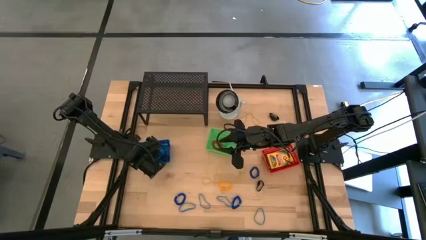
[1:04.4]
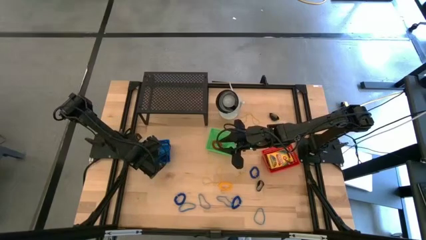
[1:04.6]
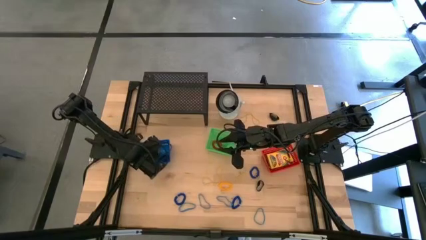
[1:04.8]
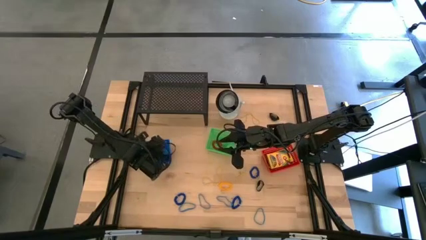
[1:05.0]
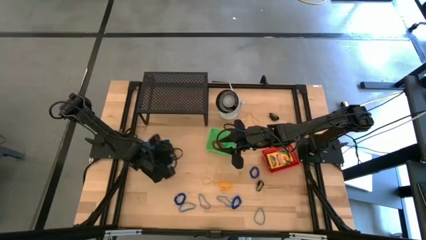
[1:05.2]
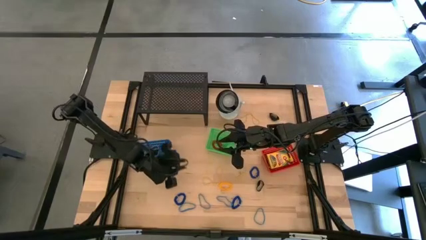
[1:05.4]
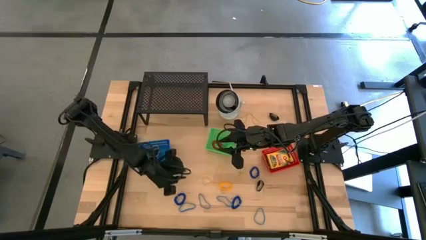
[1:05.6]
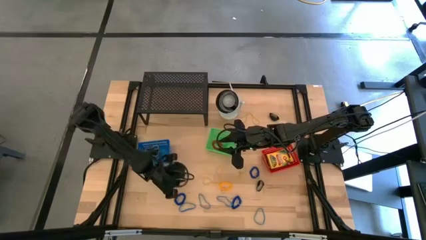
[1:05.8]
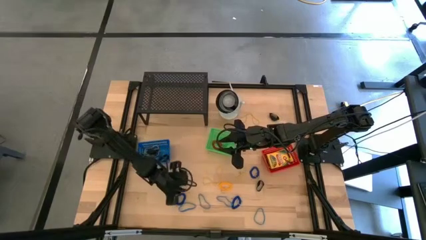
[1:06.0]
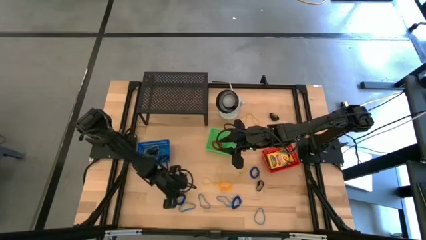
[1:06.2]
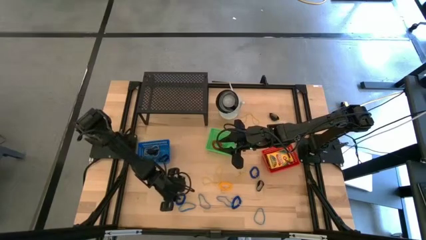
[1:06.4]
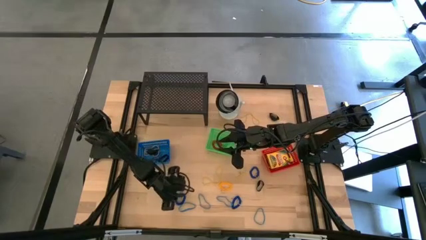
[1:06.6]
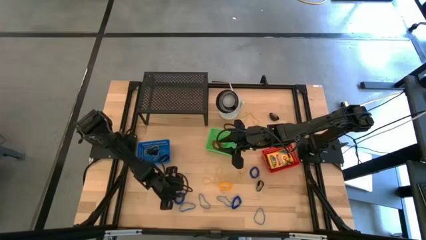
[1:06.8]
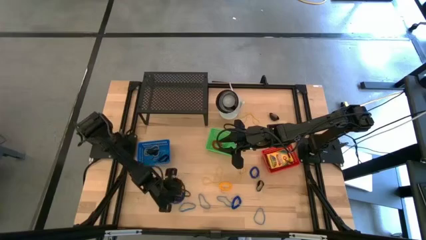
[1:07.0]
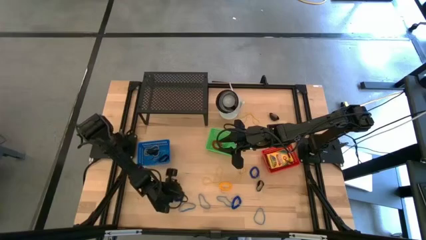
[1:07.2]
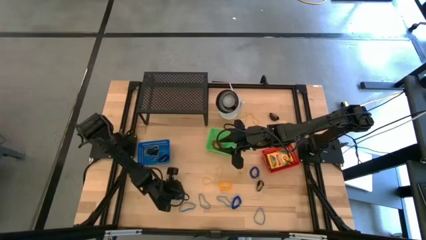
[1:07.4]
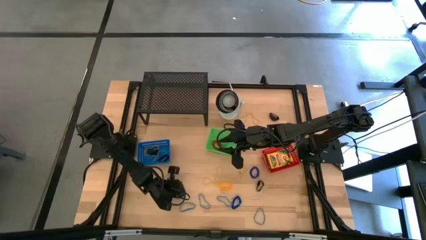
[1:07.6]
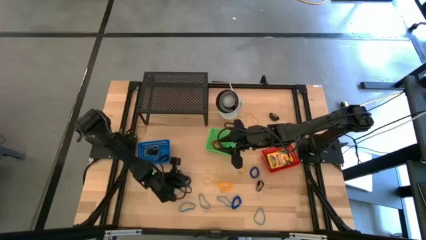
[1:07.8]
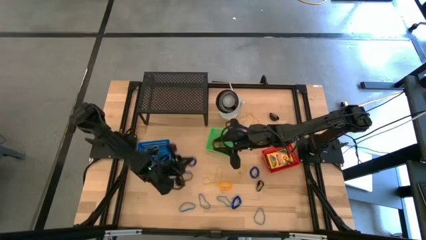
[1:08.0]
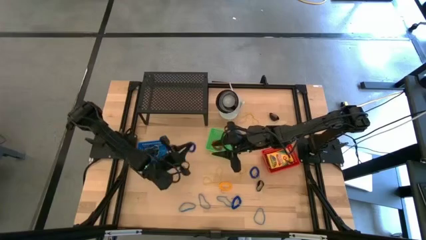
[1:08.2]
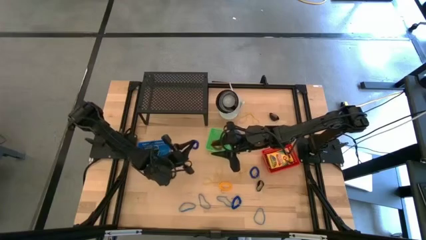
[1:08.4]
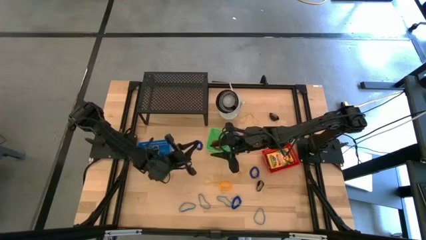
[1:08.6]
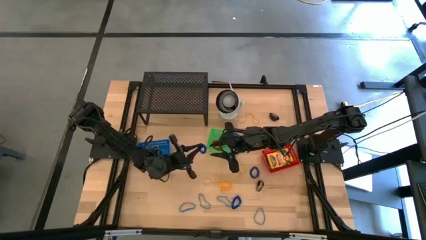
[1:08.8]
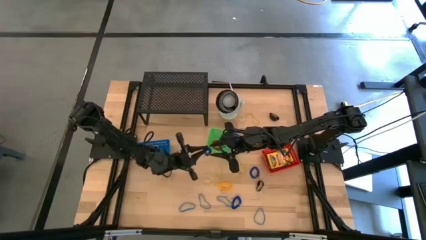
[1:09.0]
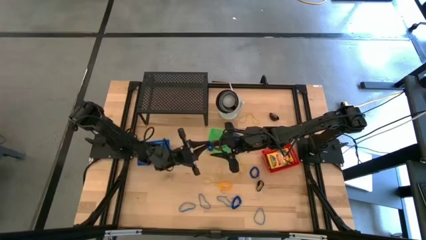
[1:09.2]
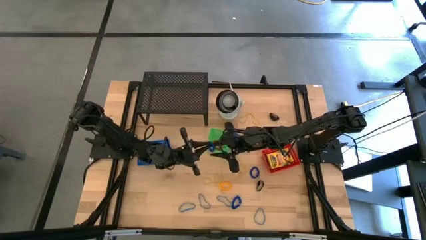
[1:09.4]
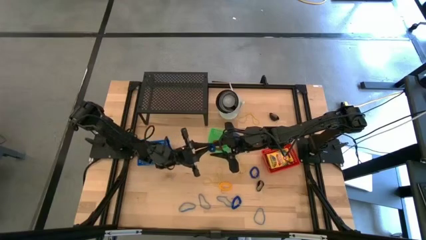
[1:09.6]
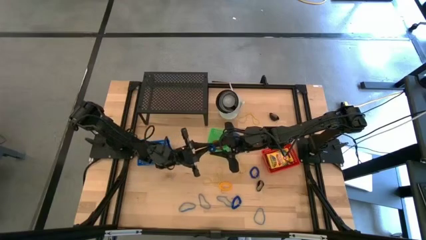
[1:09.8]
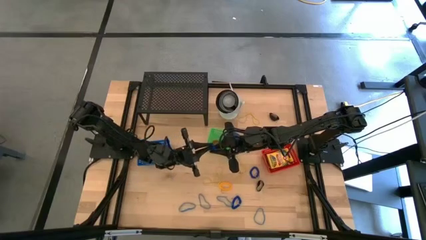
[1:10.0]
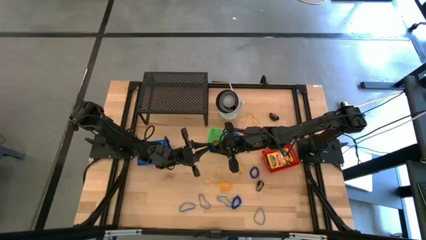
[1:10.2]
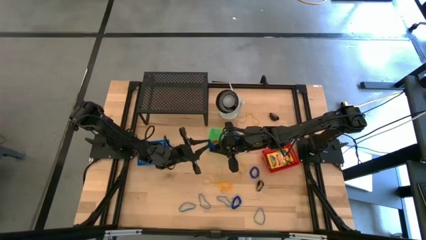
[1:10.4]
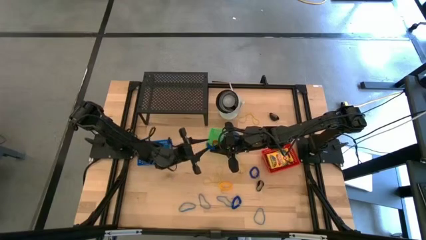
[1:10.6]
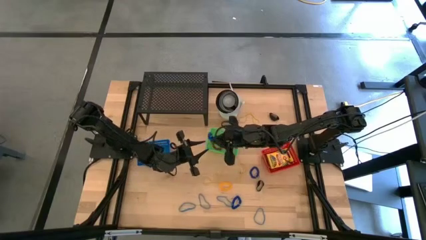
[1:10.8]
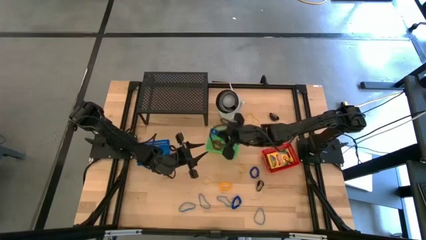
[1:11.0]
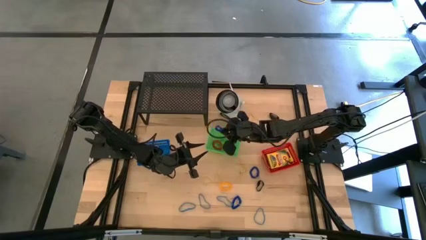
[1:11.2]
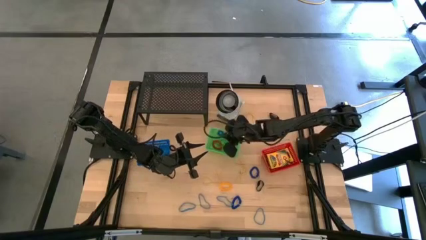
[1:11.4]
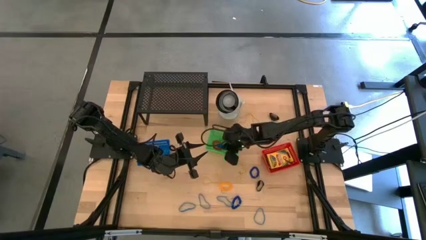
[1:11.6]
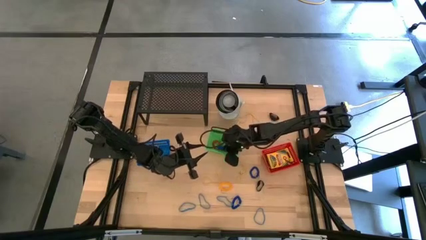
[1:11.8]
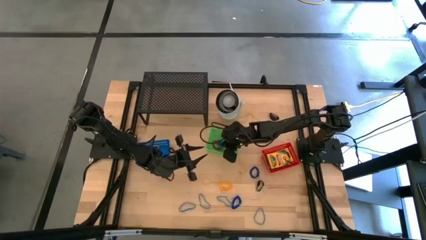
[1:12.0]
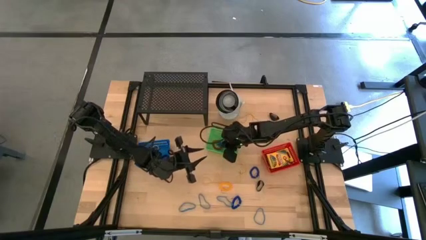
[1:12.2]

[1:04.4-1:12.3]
Task: Pick & Place Office Desk Supplies
Put the blue spring keychain into the green bin

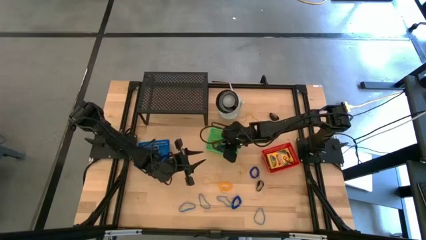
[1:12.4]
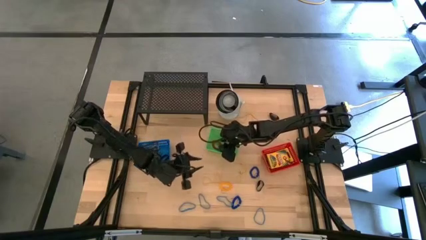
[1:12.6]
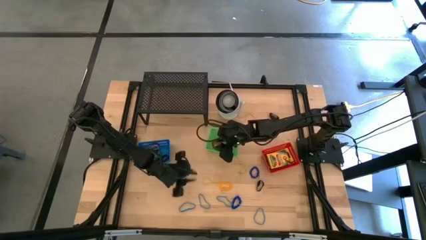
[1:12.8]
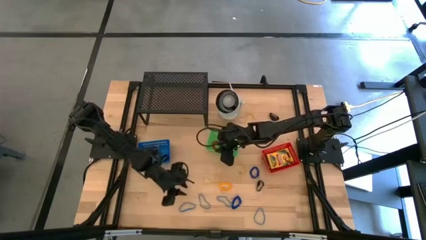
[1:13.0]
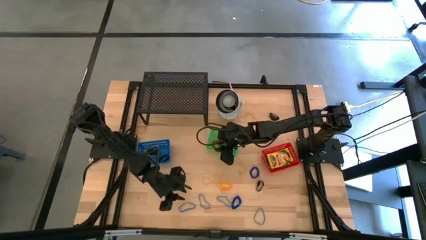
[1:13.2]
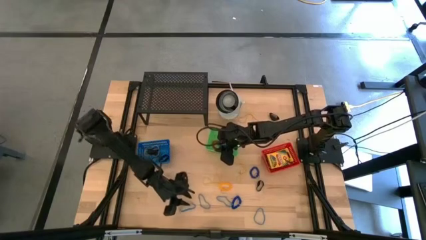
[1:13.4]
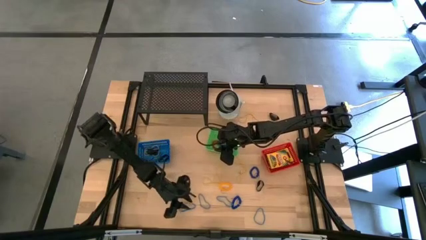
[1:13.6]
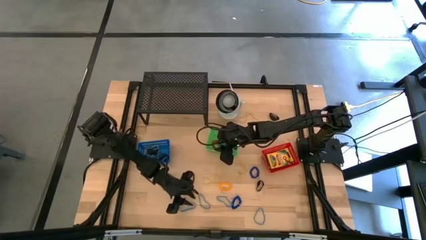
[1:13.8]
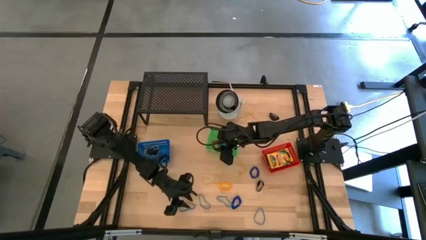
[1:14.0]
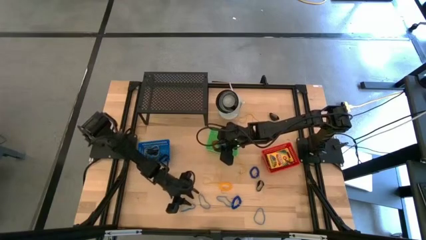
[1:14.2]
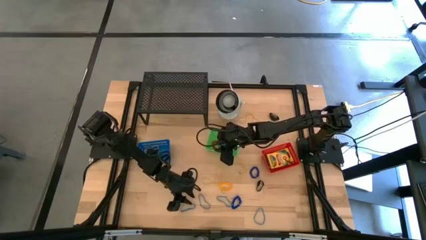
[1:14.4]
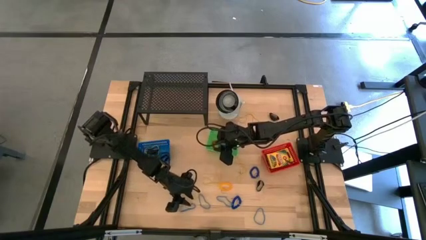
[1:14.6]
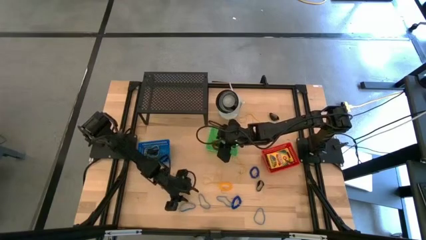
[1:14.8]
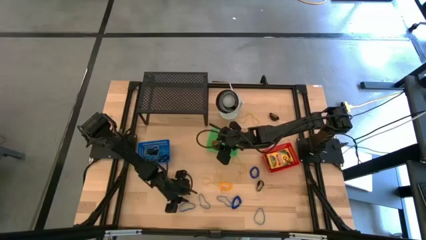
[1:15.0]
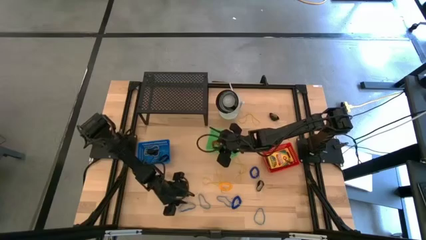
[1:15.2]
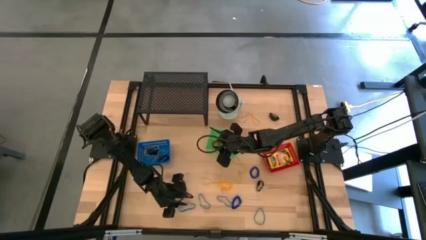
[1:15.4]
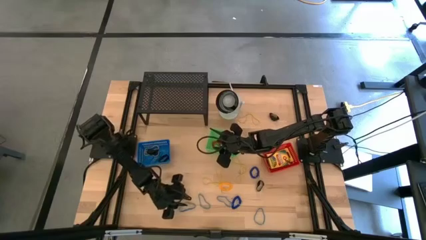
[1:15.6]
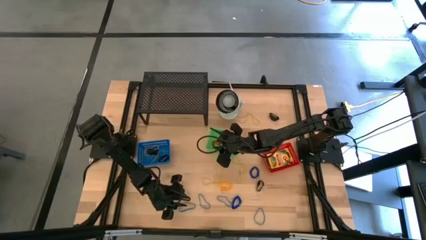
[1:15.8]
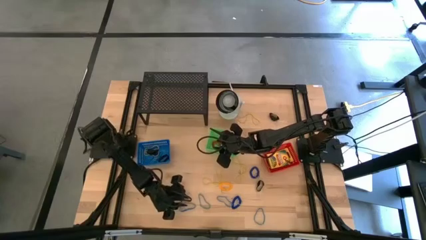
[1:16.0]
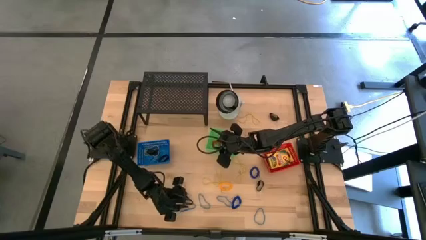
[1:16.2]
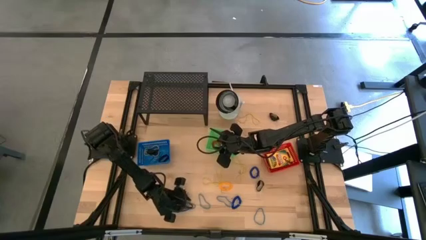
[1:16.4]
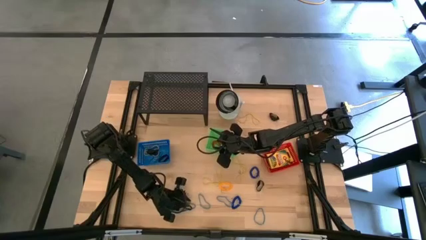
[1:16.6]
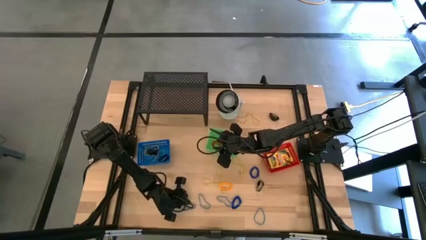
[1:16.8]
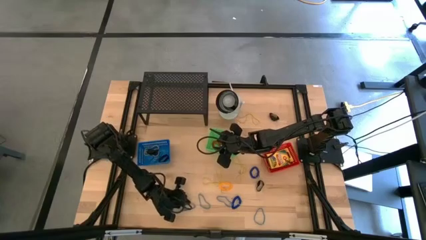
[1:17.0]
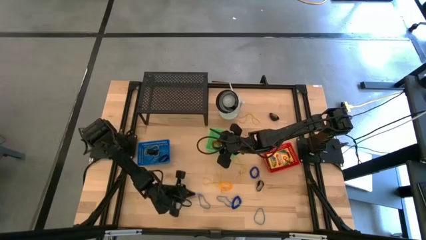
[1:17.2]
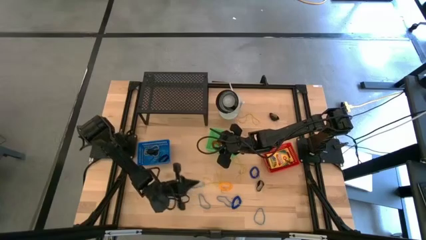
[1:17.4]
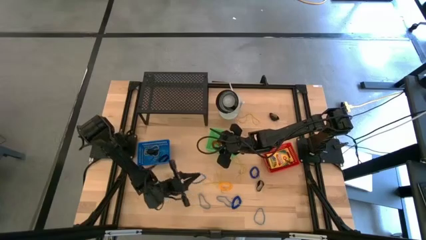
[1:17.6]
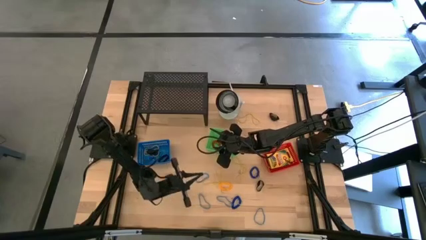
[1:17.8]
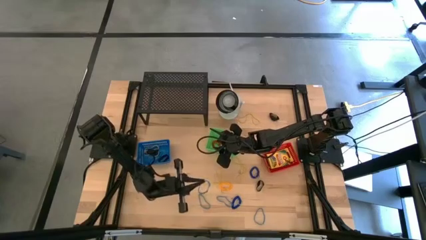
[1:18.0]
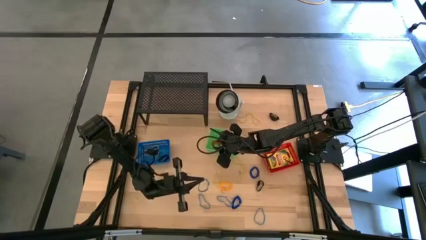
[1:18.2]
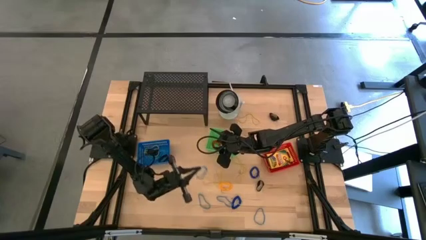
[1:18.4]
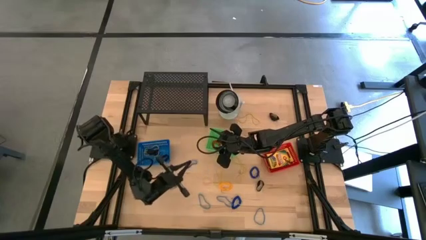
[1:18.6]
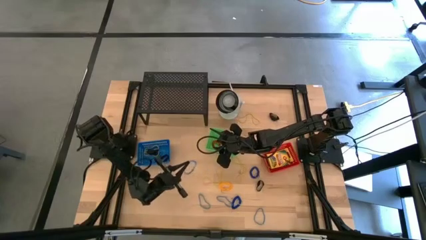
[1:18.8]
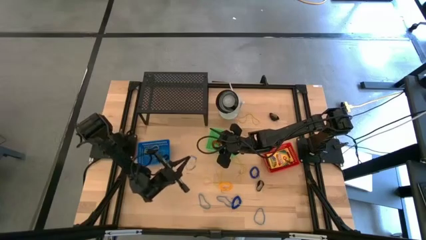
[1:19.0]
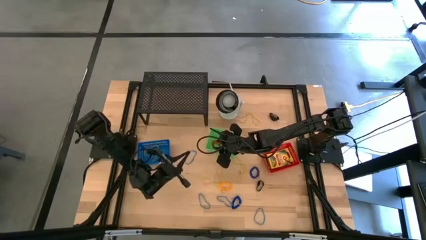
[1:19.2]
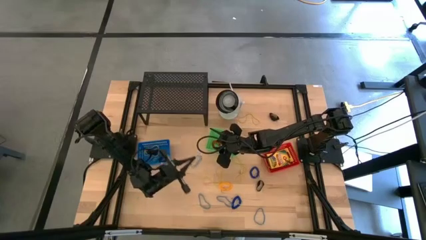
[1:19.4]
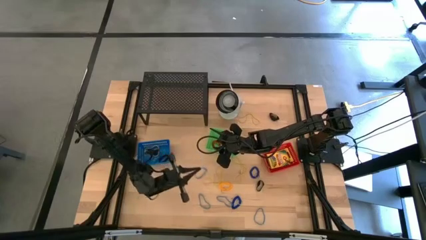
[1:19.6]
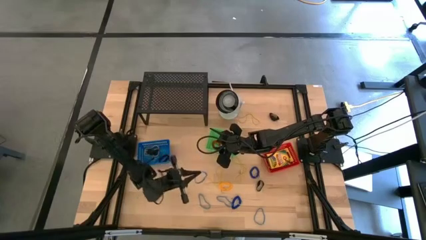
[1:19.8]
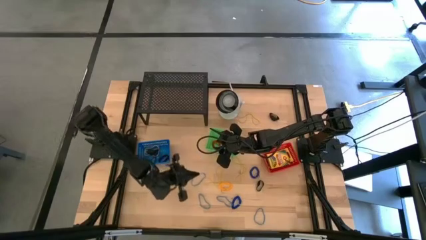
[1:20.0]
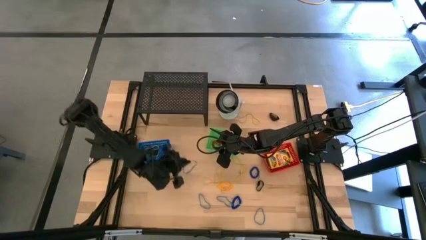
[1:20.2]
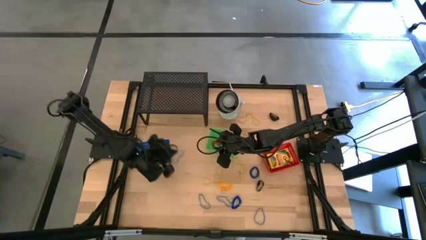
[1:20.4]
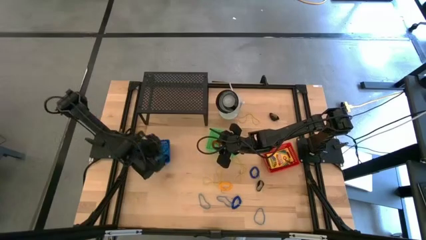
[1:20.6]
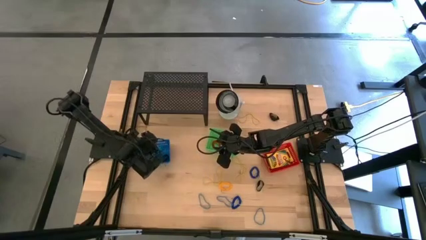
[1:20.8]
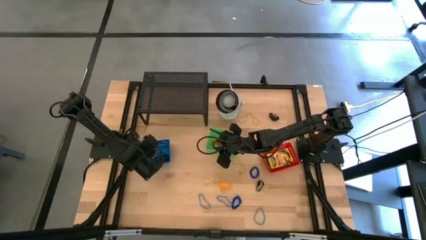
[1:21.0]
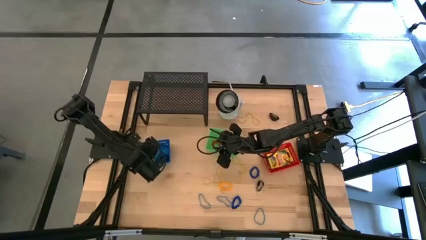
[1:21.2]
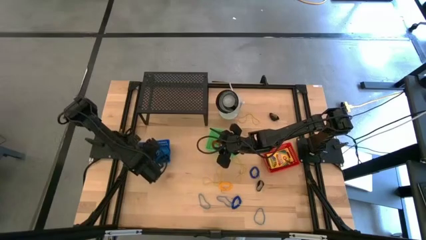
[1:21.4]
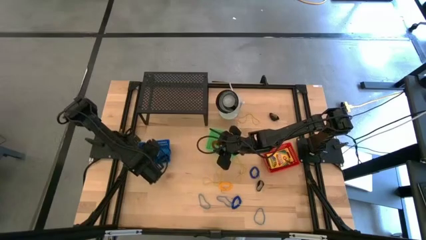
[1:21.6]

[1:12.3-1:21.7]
Put the blue rubber band into the blue bin
